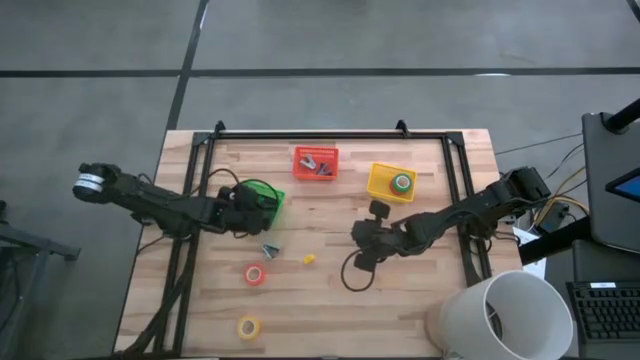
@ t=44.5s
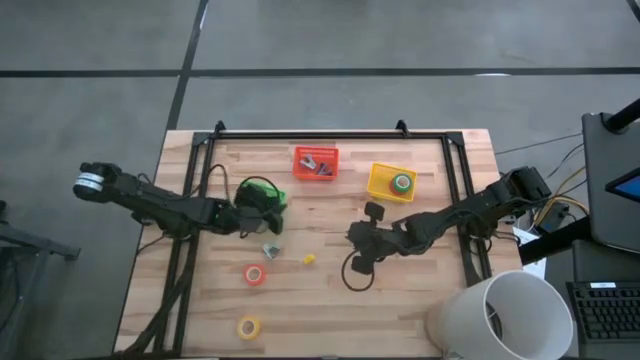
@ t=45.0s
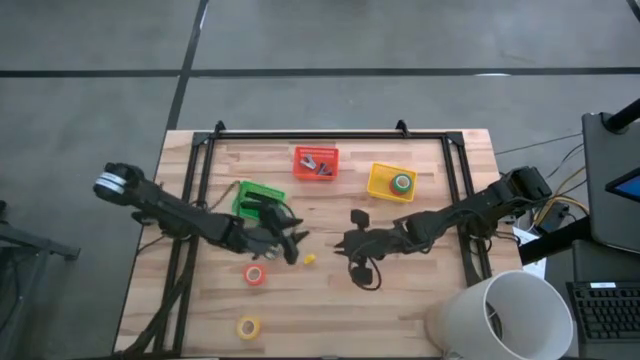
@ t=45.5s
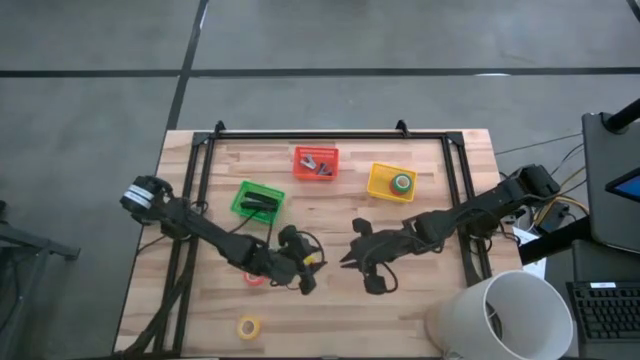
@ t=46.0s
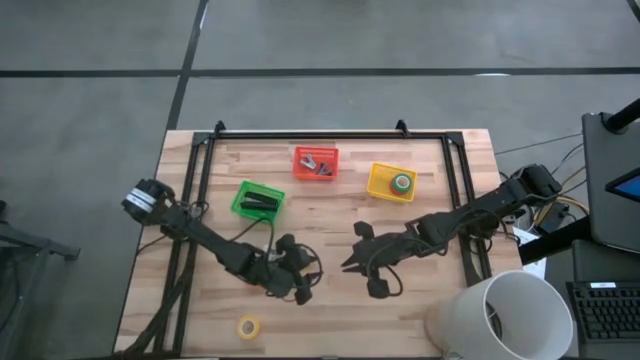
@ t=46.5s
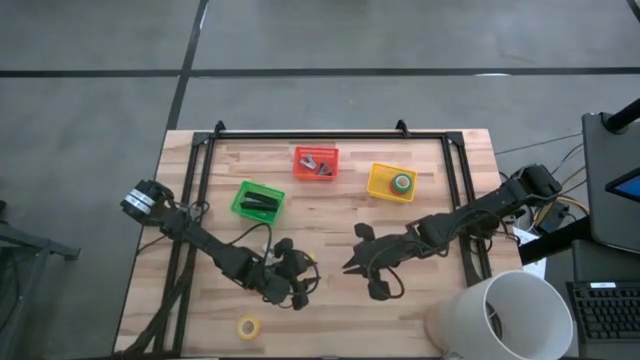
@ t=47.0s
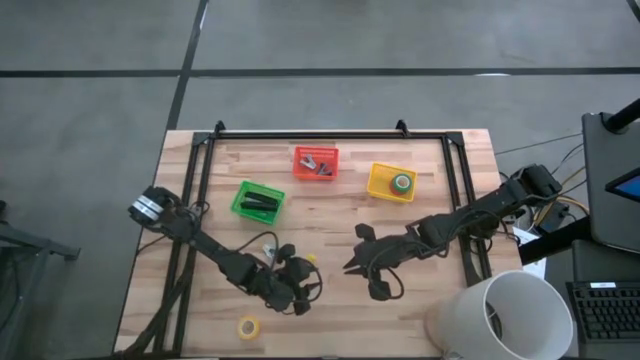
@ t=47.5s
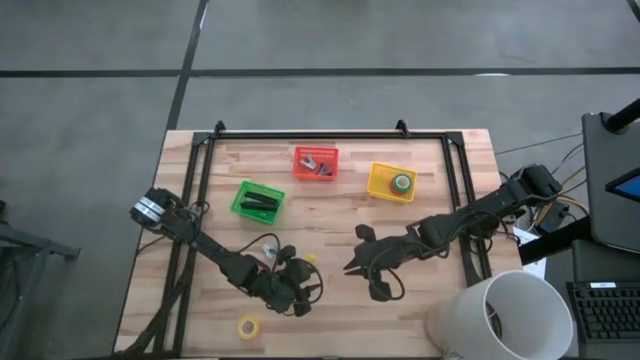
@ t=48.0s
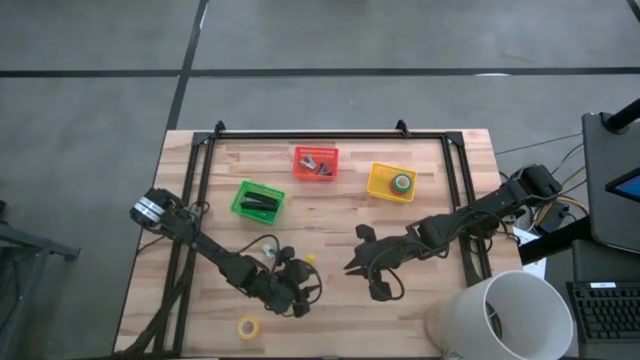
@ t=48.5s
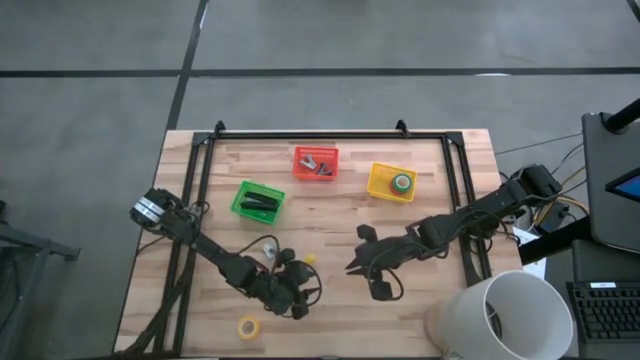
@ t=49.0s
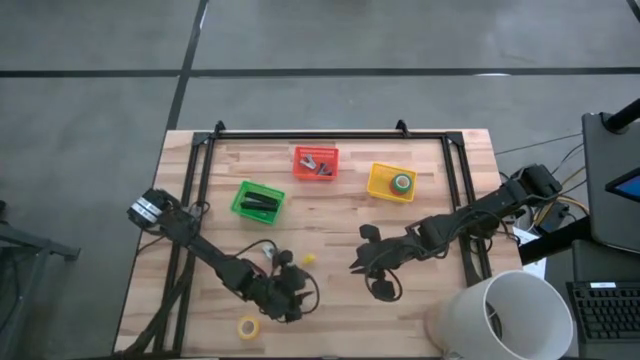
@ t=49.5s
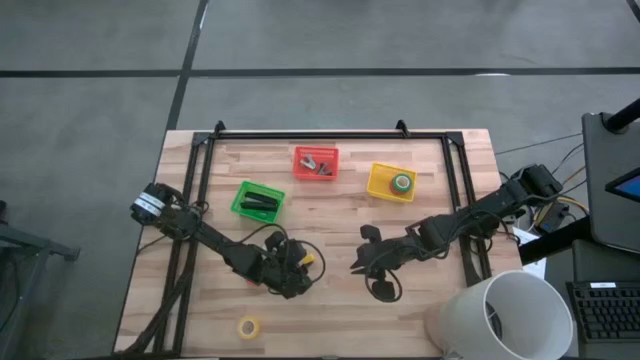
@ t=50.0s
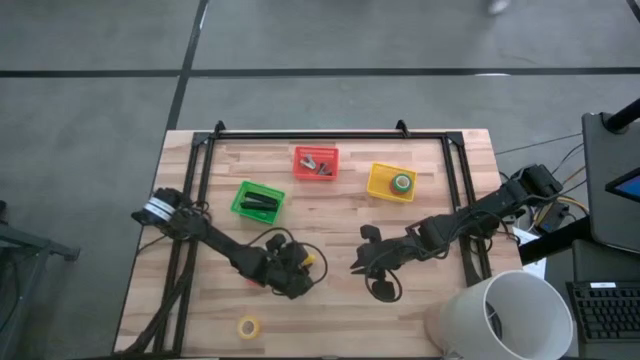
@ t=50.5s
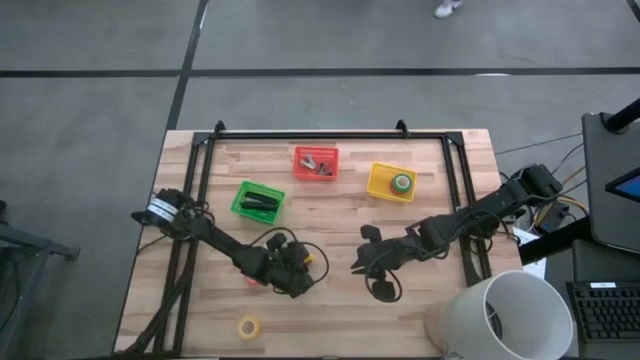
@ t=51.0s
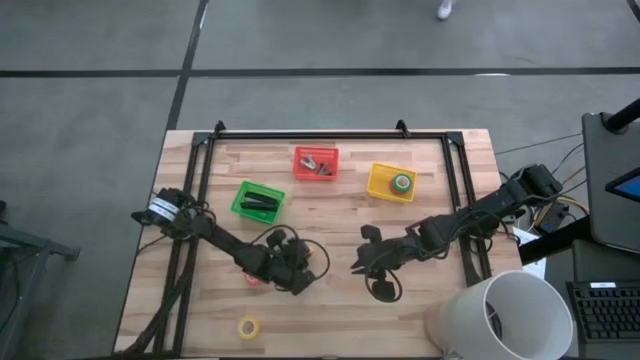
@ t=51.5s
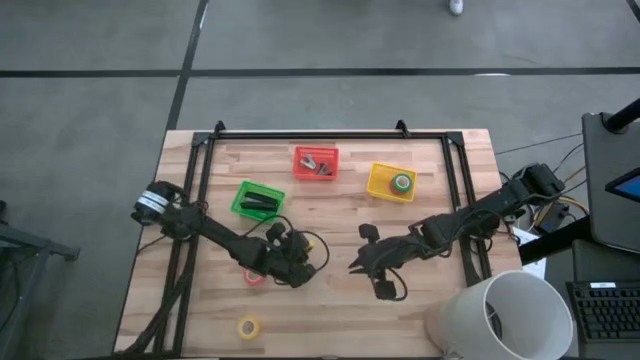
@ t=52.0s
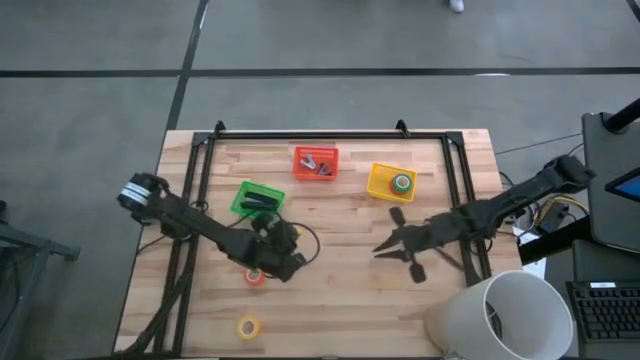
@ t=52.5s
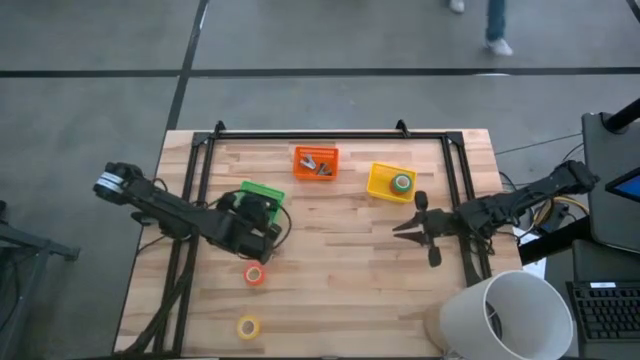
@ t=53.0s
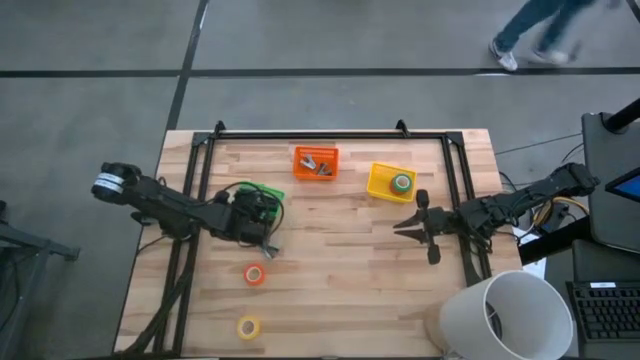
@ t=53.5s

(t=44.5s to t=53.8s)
Task: Pick and place Stapler, Stapler remover, tape
Put the yellow stapler into the green basket

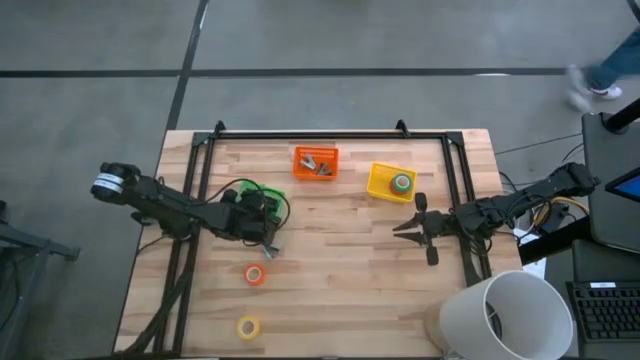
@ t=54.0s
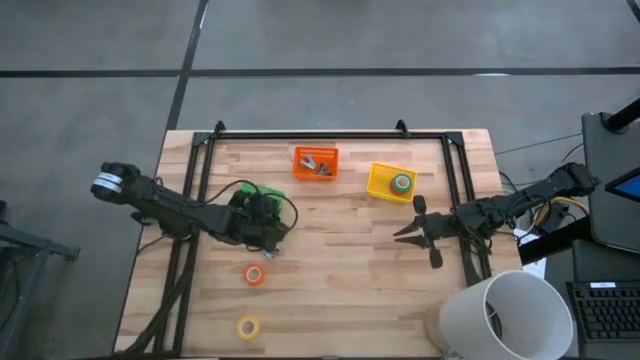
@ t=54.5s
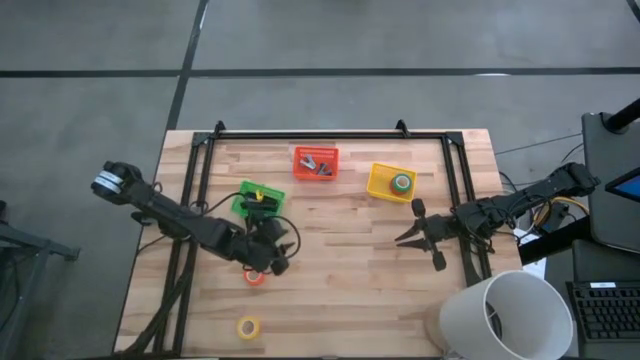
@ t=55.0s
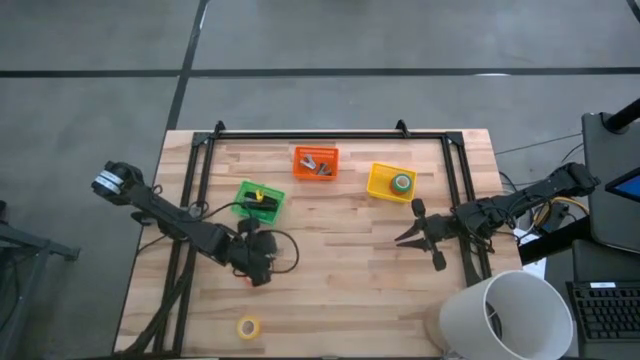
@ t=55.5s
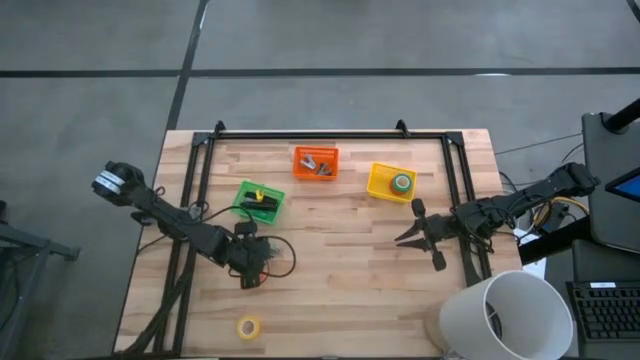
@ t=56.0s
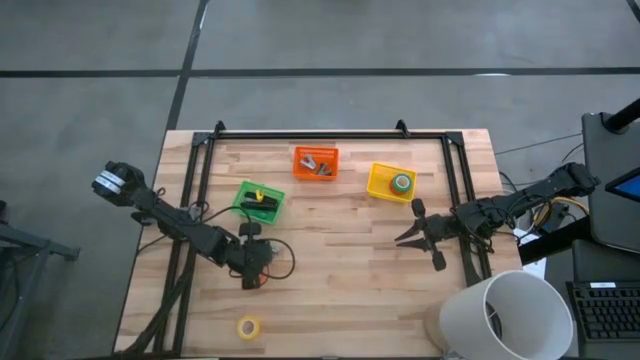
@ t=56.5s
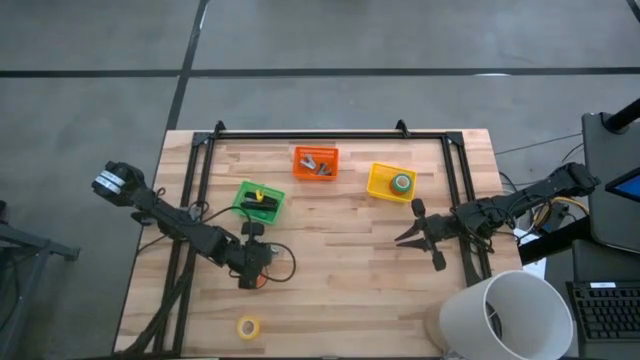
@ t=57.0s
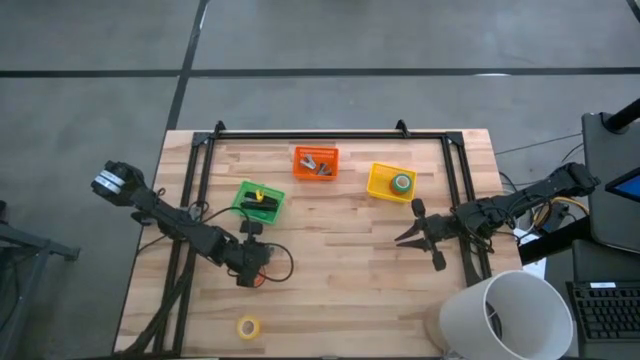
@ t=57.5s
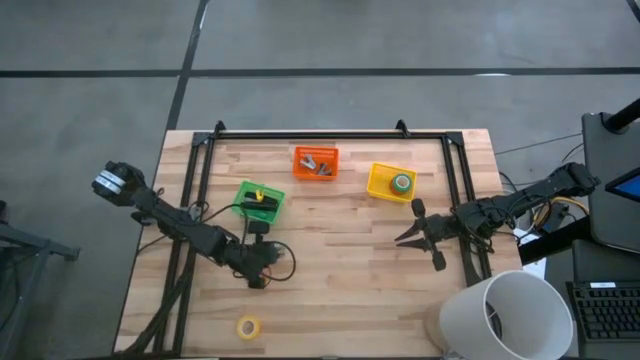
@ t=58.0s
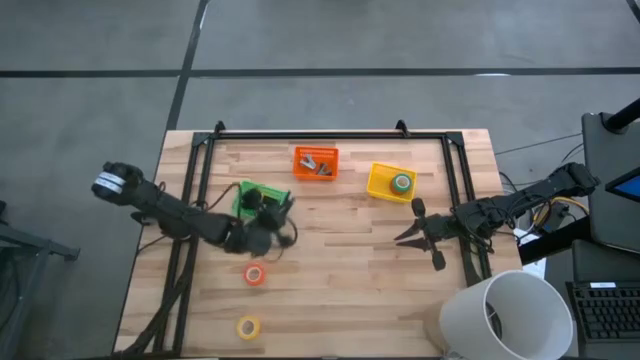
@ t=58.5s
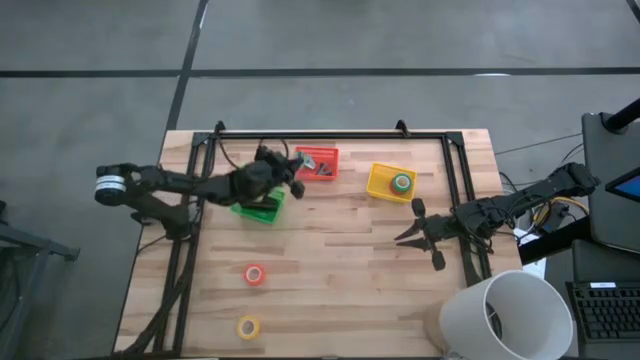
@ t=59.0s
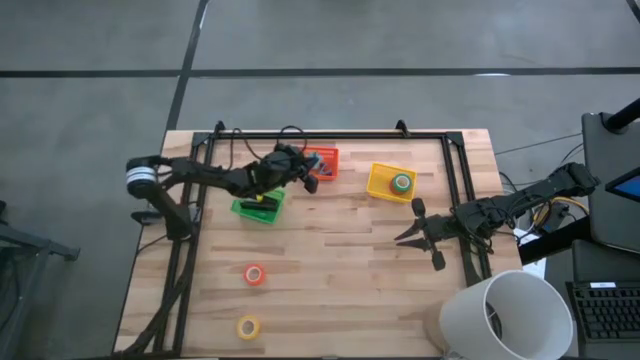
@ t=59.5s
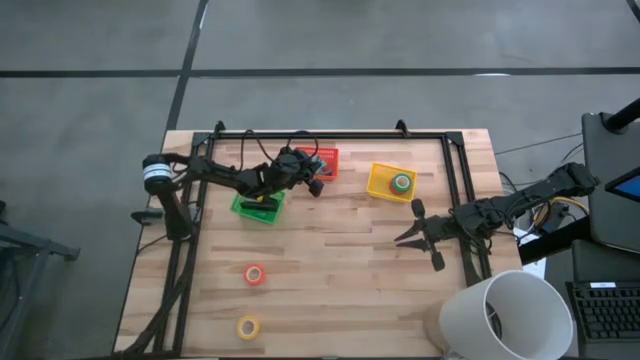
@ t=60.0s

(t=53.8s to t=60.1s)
Put the light blue staple remover into the orange basket

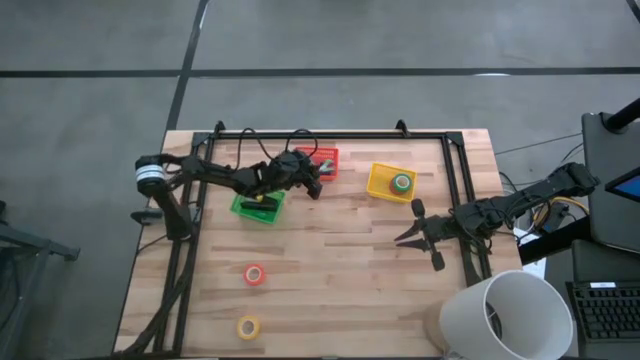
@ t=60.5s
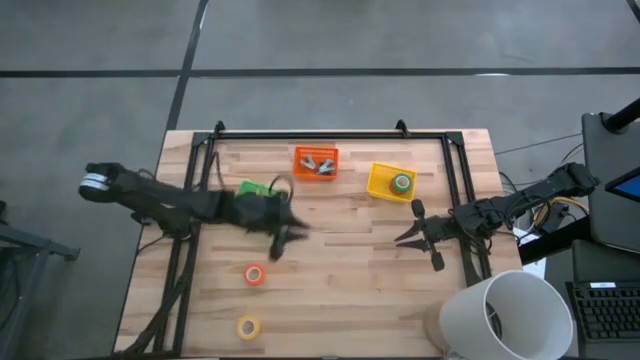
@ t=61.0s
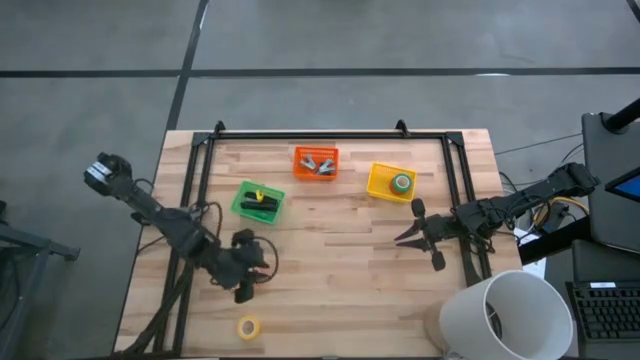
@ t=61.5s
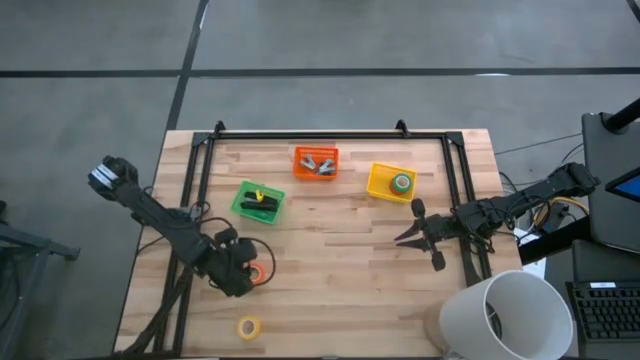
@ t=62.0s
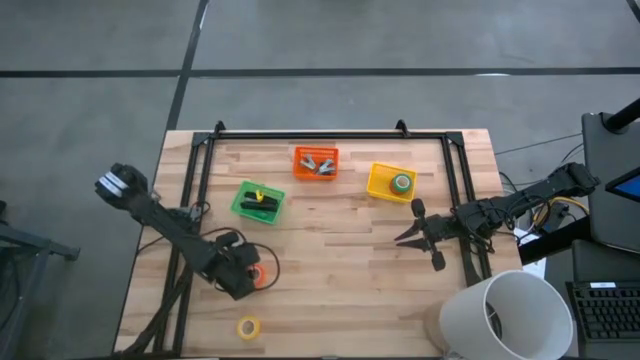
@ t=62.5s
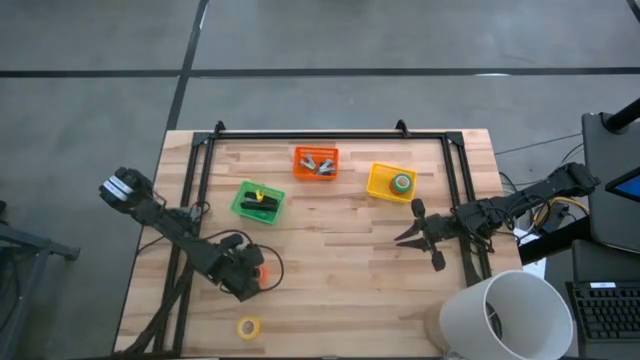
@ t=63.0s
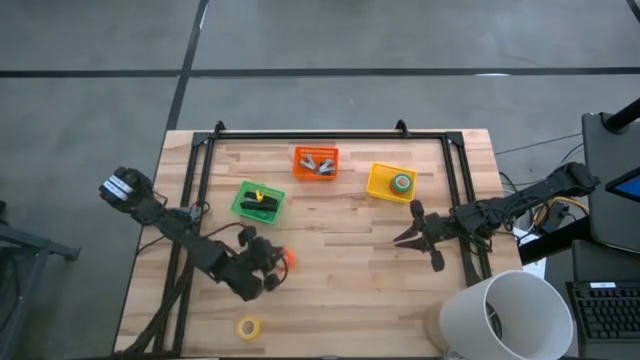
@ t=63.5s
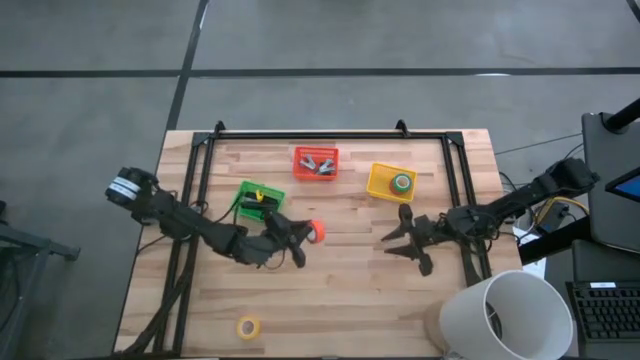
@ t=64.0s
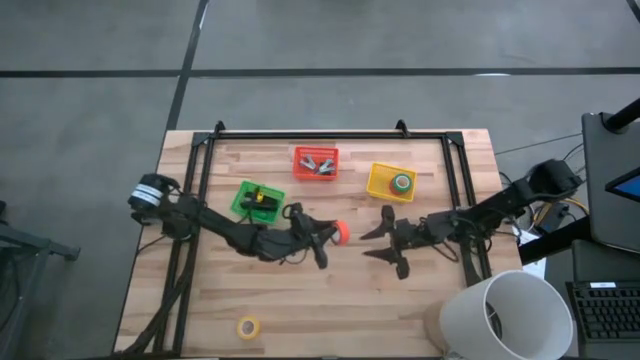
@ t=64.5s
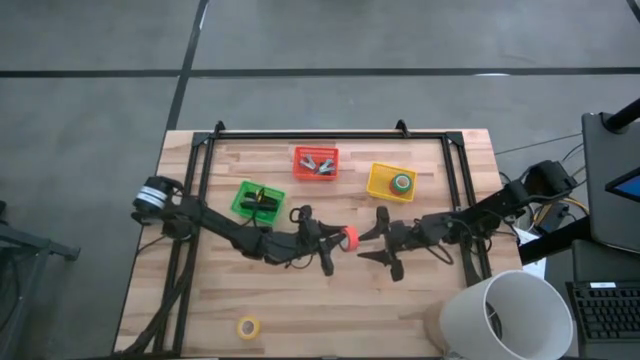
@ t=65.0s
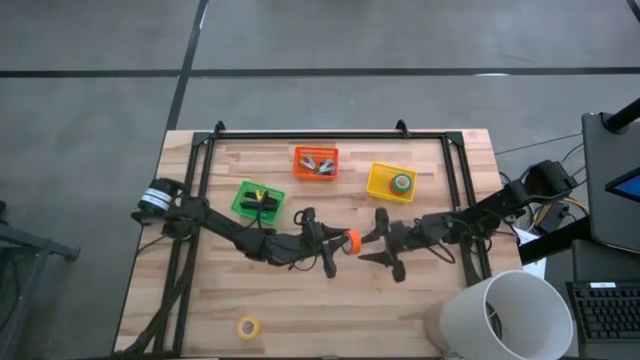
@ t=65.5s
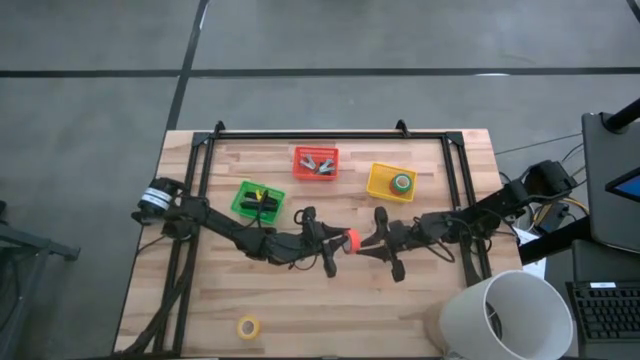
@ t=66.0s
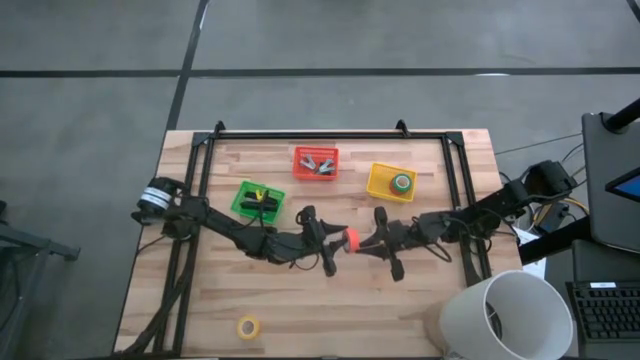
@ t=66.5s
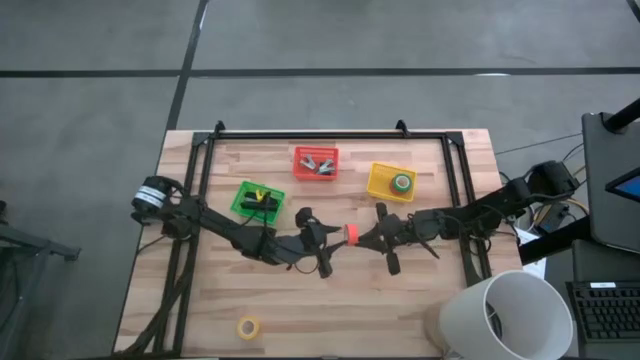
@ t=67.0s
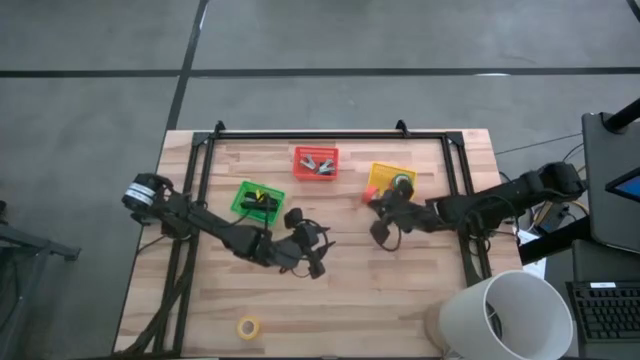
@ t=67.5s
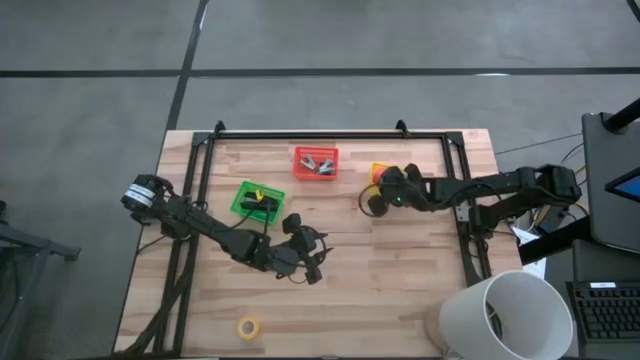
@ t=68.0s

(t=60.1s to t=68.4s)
Put the orange tape into the yellow basket
